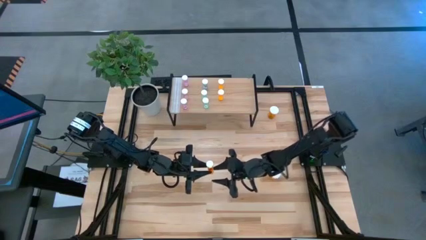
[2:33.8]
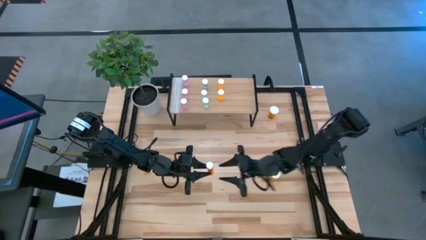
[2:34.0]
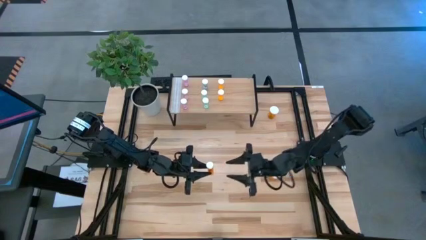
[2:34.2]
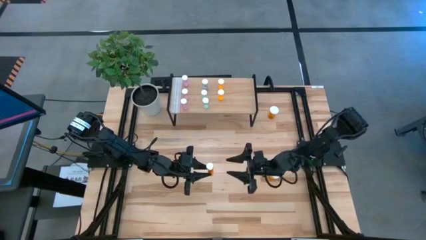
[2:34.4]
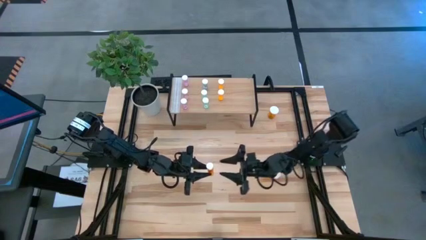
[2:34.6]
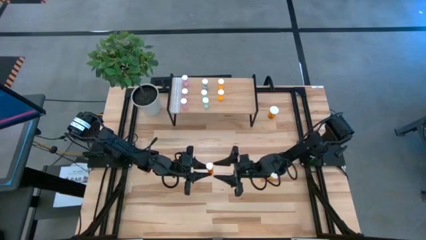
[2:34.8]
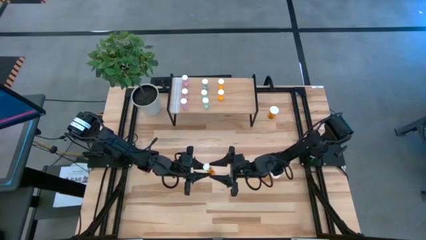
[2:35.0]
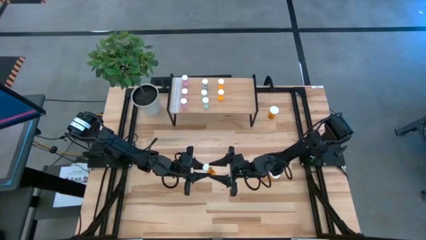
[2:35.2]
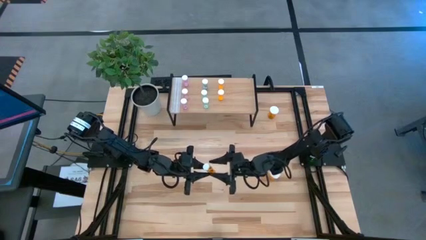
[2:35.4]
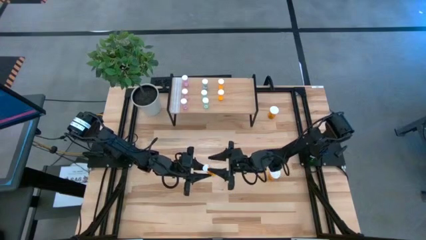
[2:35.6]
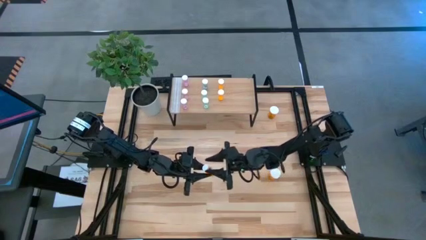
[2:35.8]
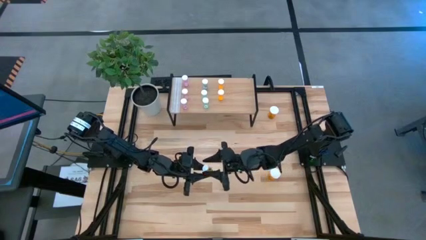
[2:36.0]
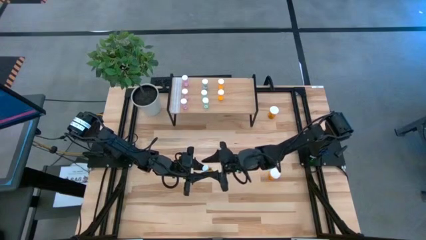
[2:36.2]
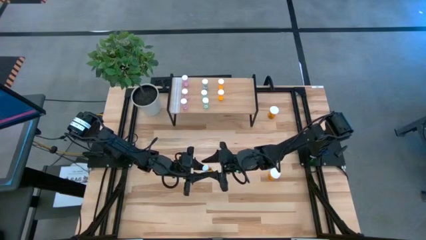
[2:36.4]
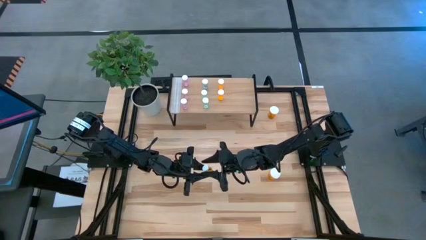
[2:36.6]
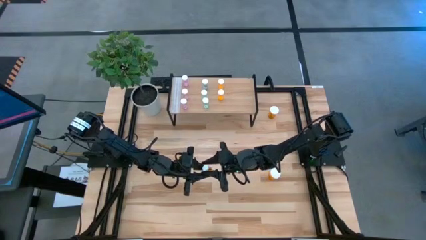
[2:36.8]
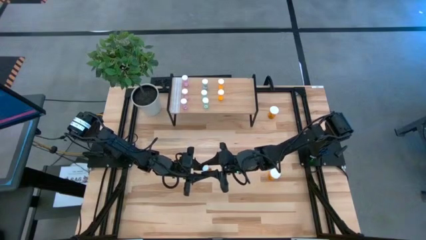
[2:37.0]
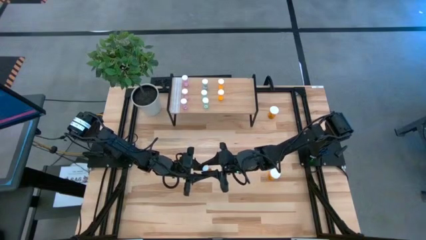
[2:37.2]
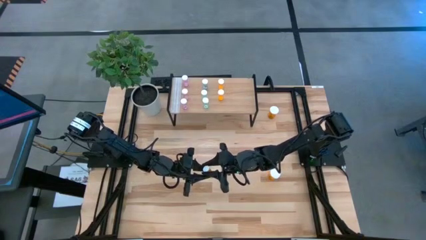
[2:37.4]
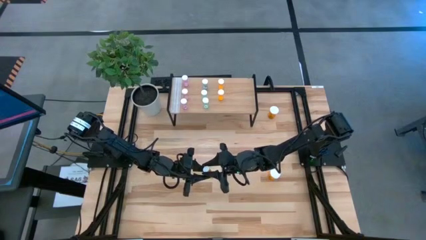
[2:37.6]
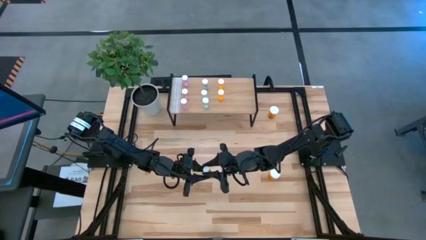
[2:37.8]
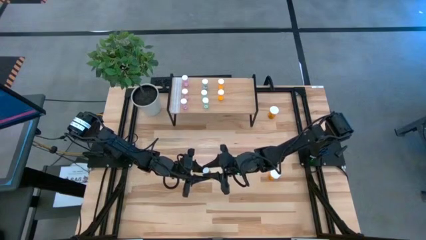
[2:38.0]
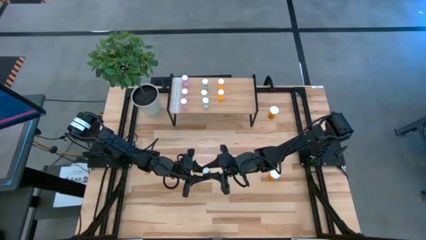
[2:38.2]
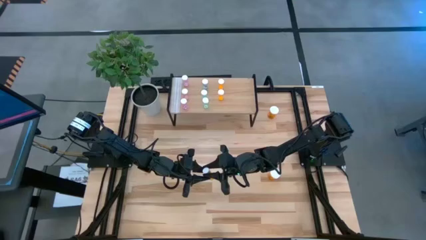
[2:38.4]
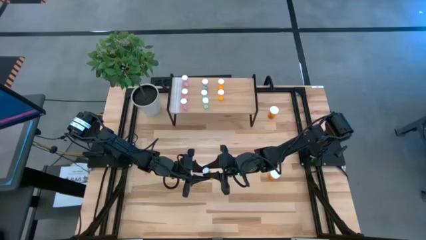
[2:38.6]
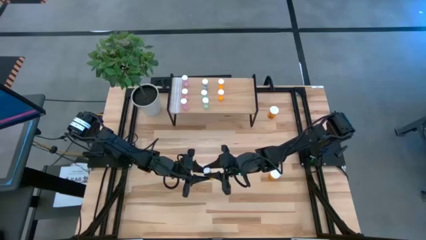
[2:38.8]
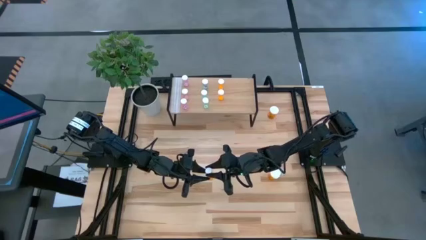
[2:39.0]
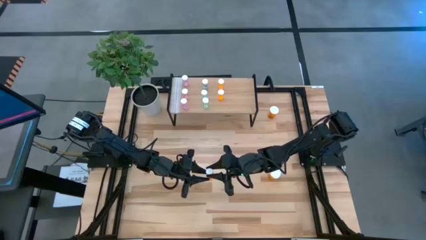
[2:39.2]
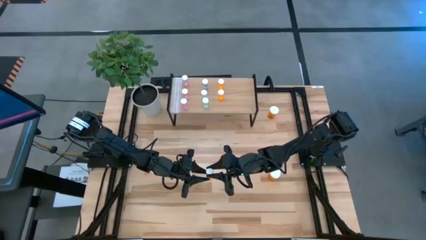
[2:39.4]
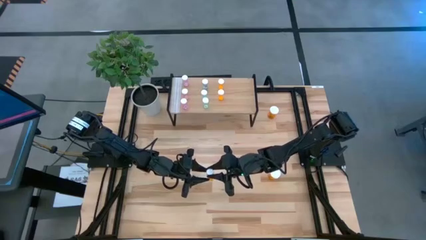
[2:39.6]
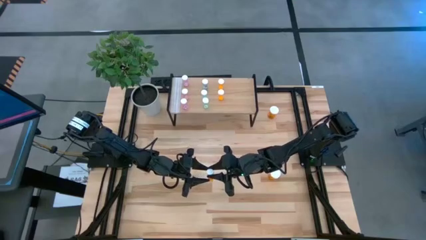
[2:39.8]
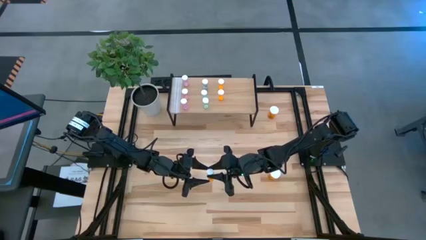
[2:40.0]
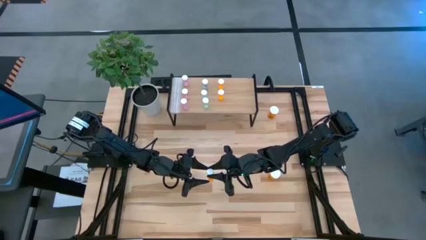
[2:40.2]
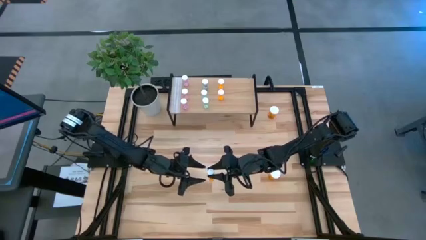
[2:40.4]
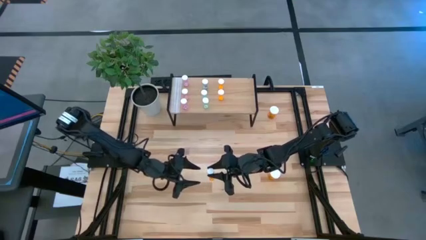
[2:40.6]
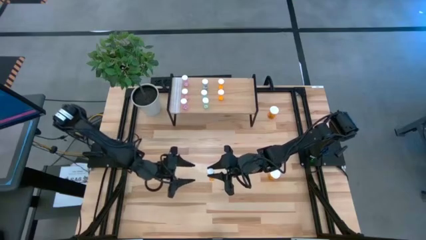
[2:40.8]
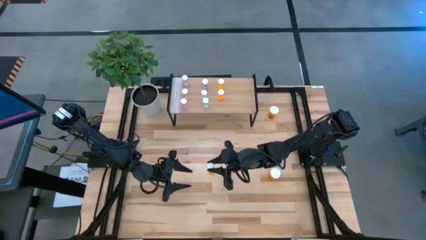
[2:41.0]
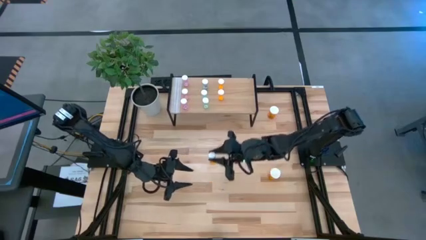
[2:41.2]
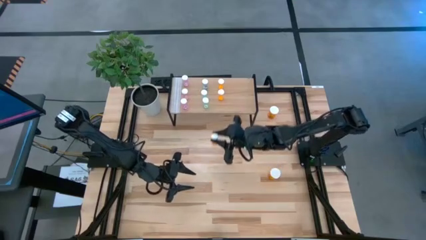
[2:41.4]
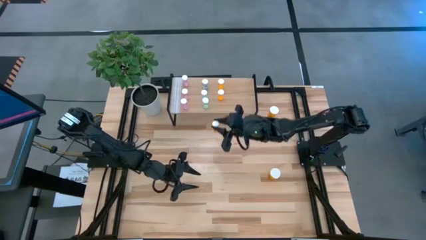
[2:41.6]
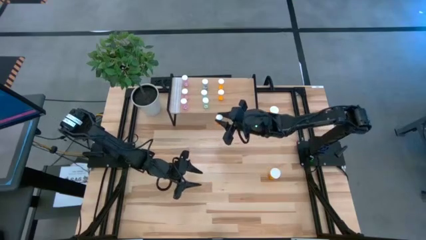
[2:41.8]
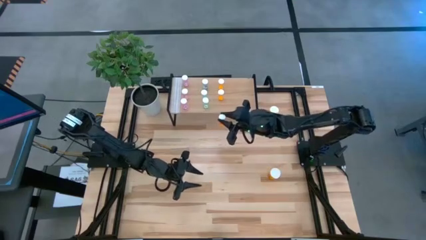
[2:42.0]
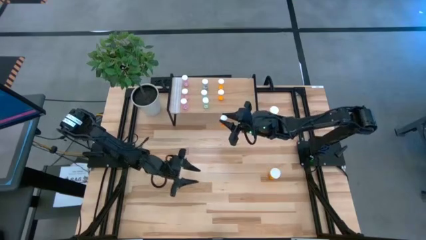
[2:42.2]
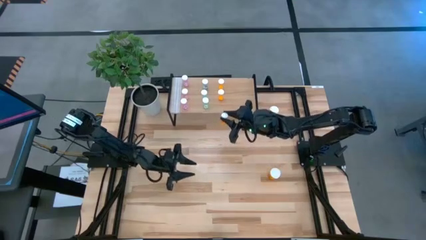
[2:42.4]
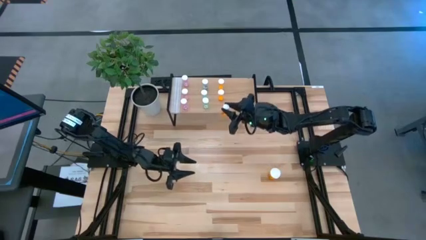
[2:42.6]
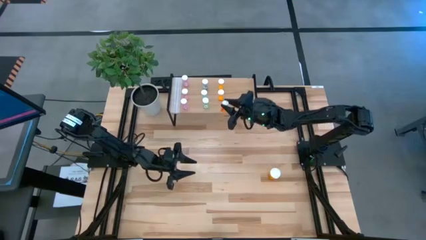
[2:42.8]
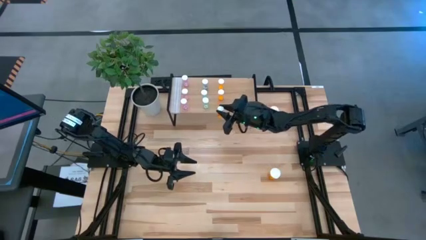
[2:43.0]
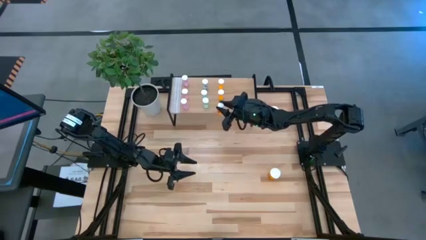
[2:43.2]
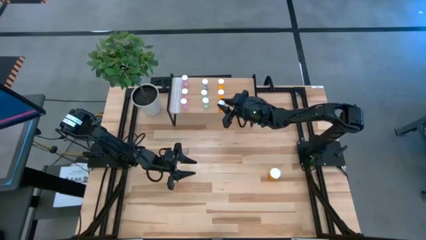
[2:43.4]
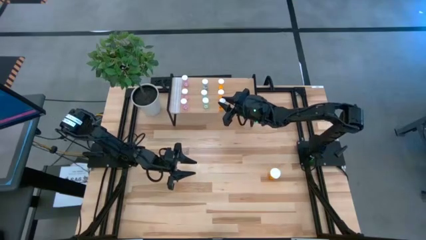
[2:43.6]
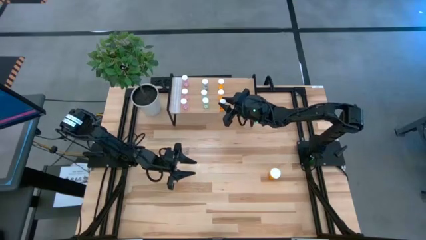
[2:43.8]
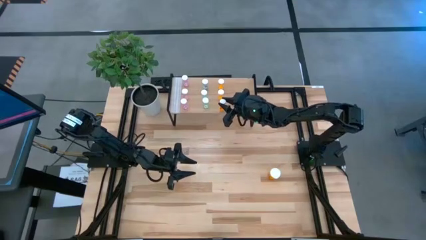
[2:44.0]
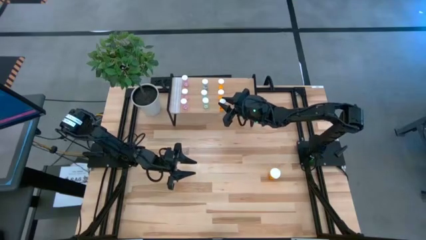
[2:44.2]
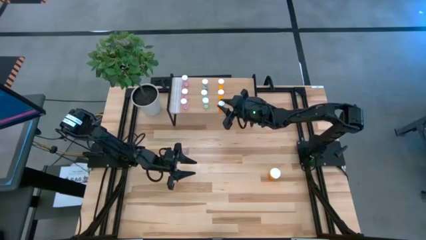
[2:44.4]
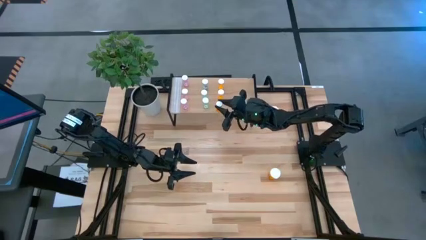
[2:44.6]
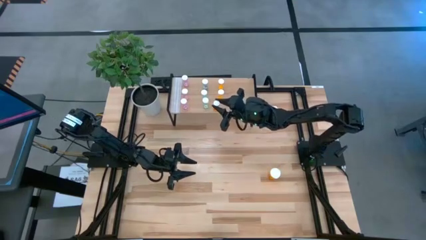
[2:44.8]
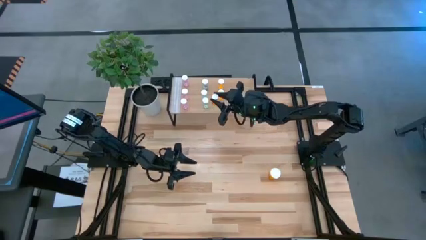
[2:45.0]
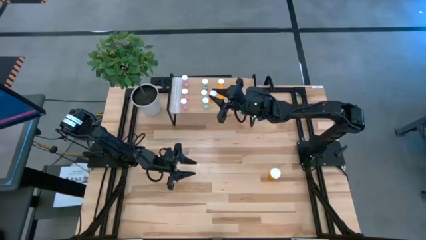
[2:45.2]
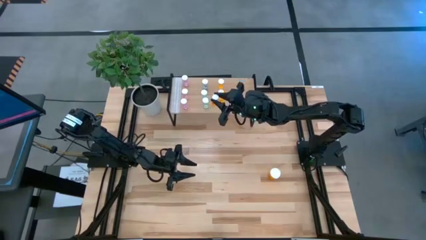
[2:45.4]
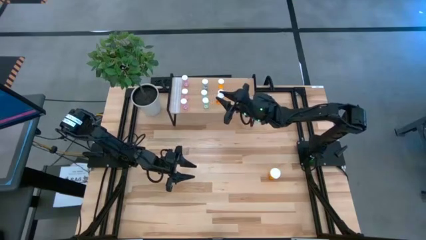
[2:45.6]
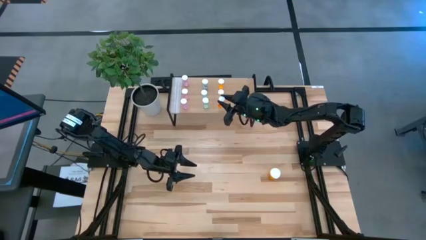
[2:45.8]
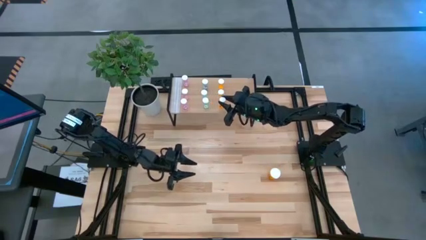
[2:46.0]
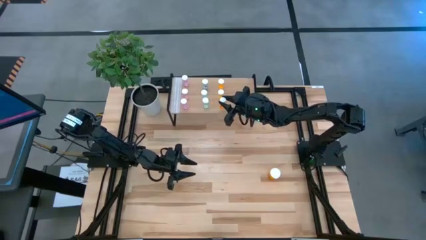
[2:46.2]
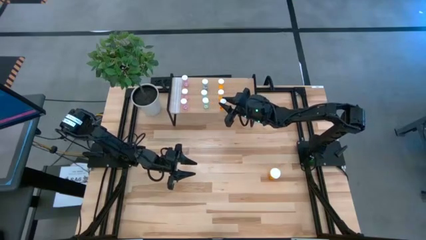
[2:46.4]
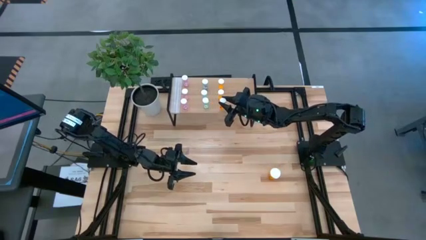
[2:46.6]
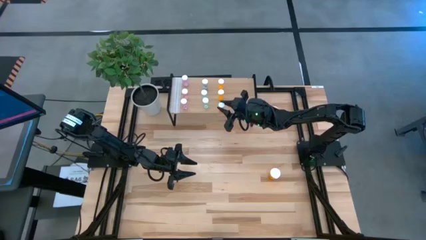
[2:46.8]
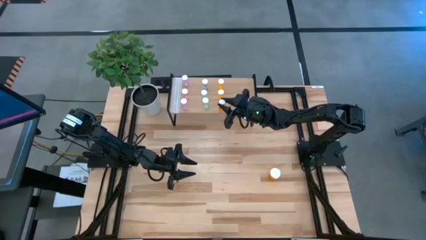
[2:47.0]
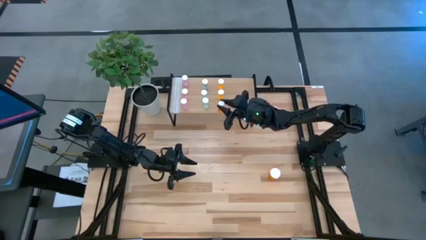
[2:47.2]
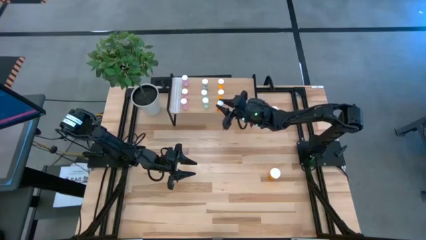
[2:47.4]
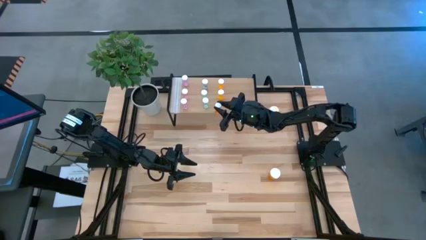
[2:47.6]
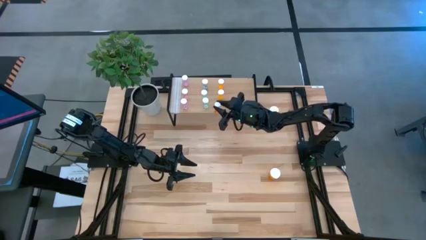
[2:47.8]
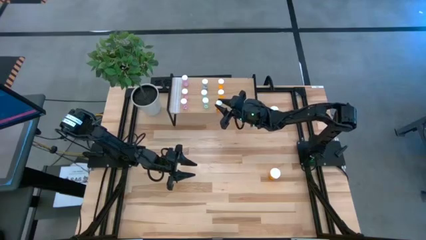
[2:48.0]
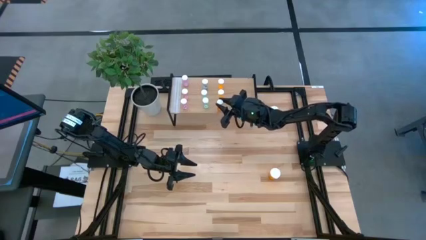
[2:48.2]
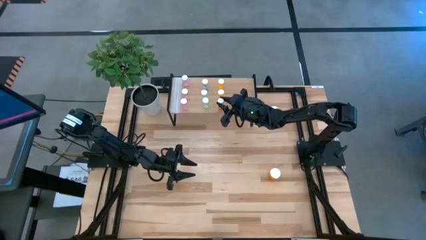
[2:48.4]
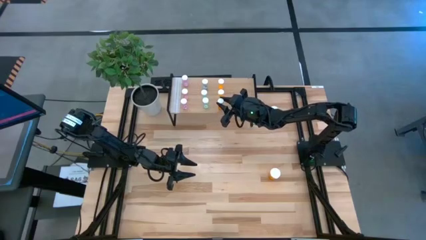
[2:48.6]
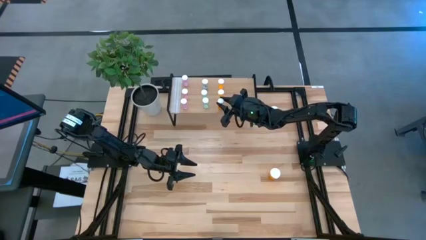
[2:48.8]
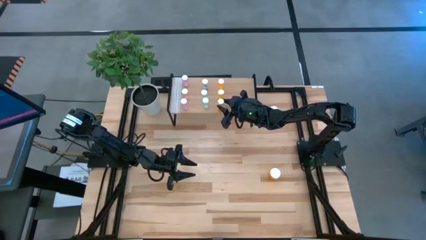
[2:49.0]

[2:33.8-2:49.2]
Task: Pick and place medicine bottles onto shelf by color
Put the small orange pill bottle aligned with the other small orange pill bottles on the shelf
